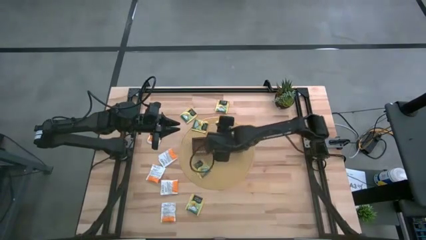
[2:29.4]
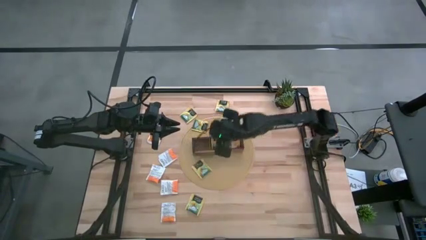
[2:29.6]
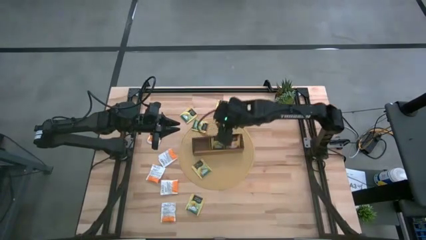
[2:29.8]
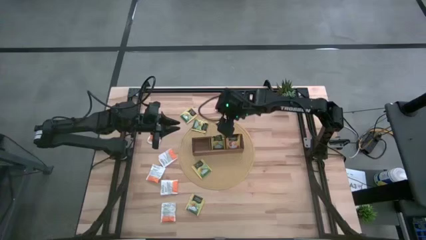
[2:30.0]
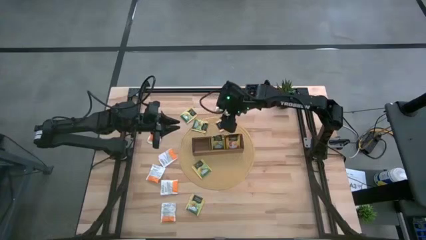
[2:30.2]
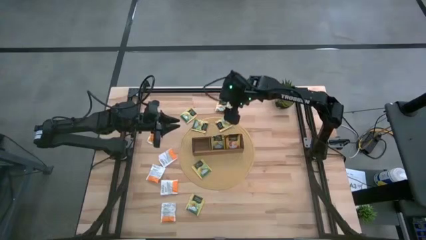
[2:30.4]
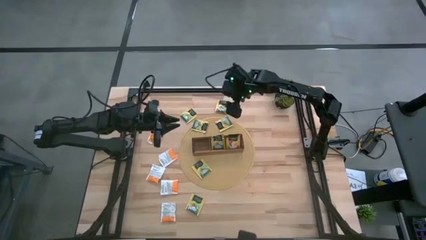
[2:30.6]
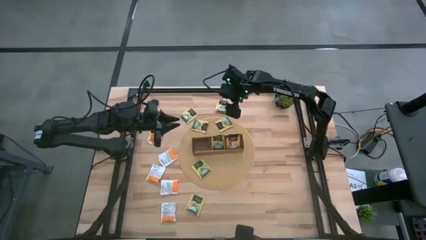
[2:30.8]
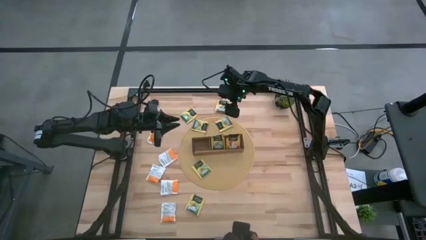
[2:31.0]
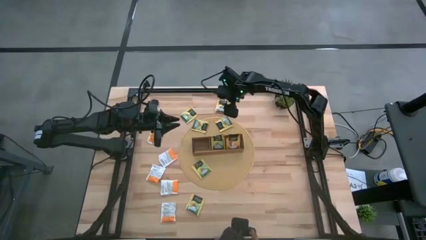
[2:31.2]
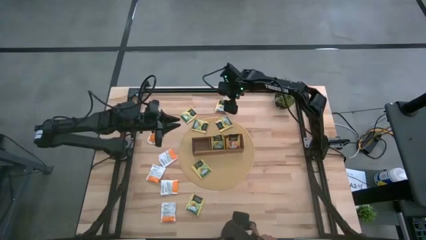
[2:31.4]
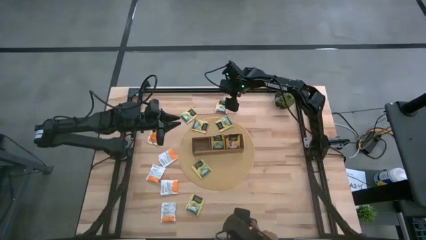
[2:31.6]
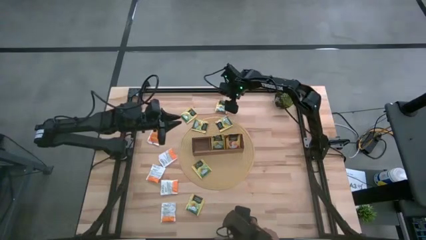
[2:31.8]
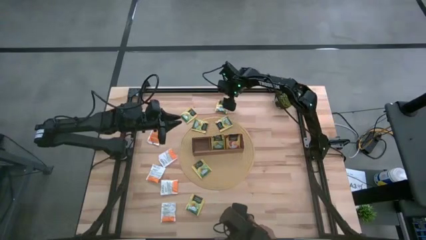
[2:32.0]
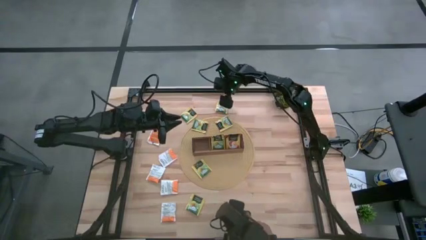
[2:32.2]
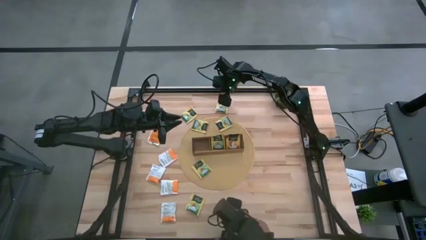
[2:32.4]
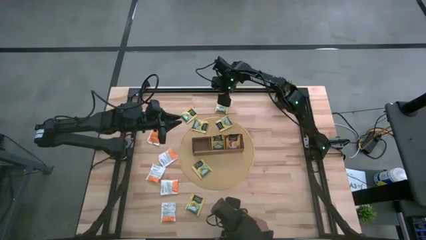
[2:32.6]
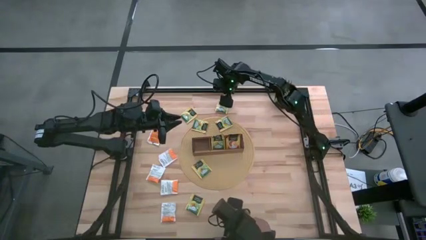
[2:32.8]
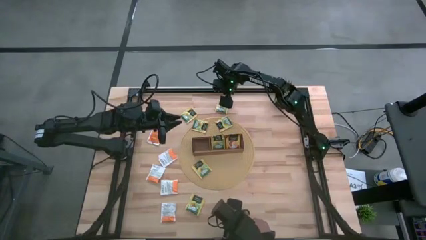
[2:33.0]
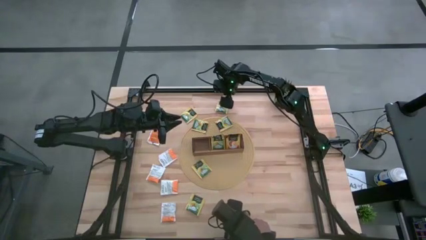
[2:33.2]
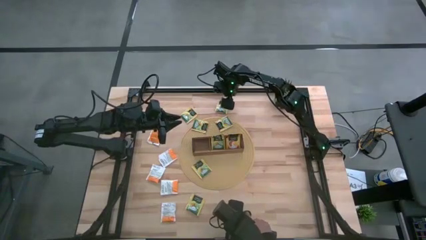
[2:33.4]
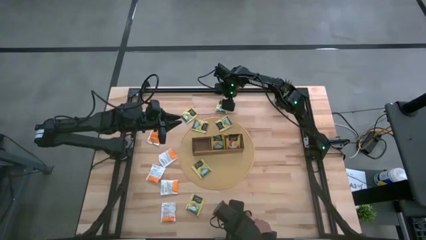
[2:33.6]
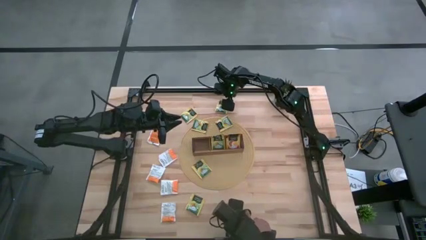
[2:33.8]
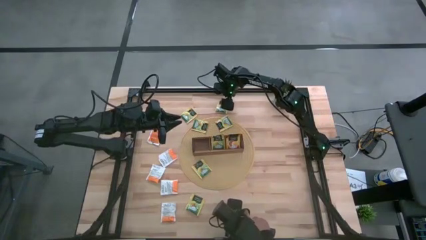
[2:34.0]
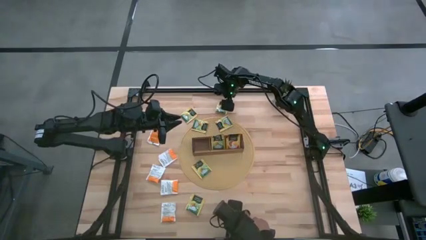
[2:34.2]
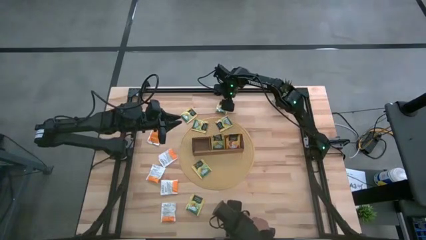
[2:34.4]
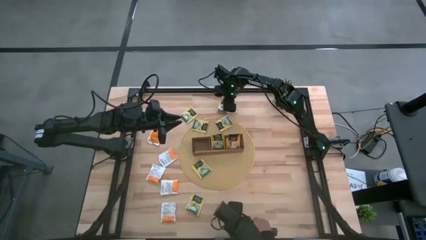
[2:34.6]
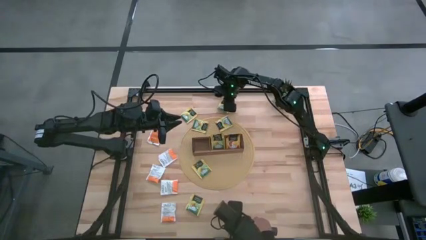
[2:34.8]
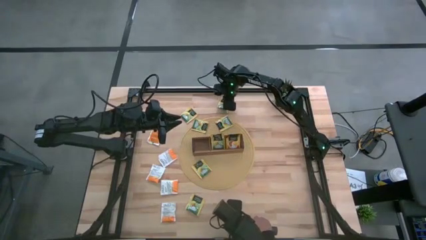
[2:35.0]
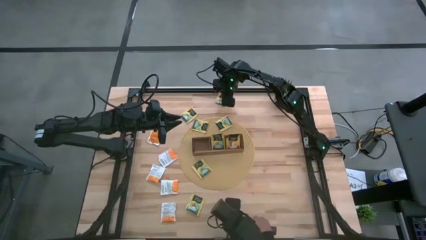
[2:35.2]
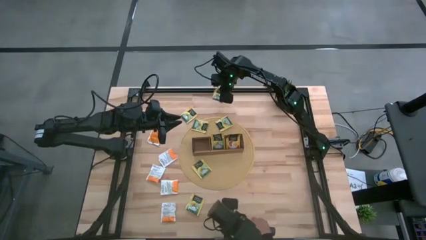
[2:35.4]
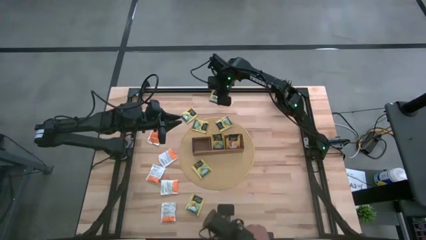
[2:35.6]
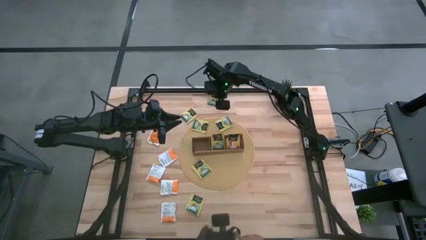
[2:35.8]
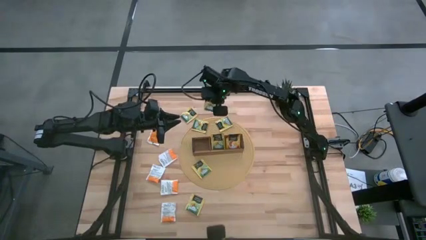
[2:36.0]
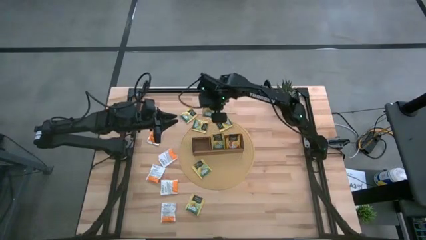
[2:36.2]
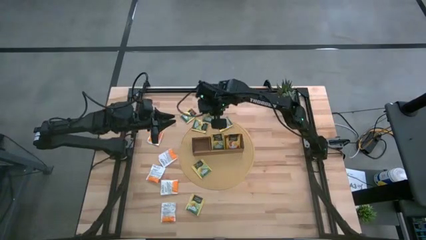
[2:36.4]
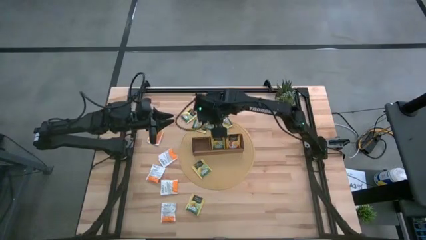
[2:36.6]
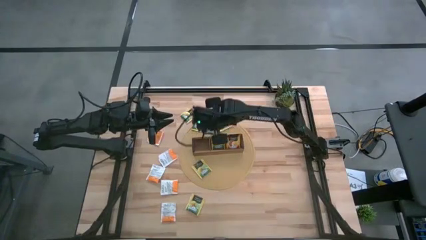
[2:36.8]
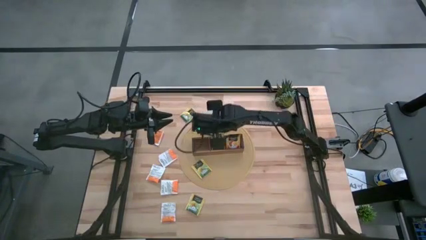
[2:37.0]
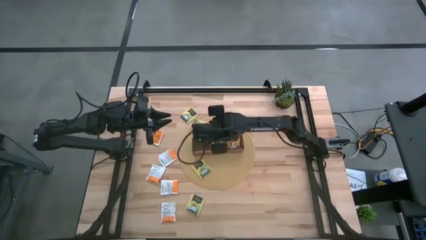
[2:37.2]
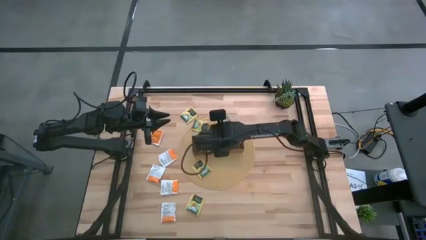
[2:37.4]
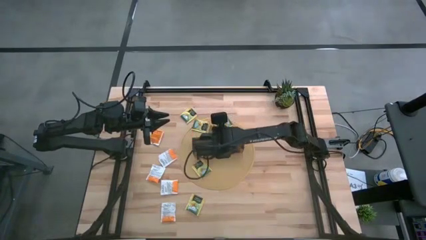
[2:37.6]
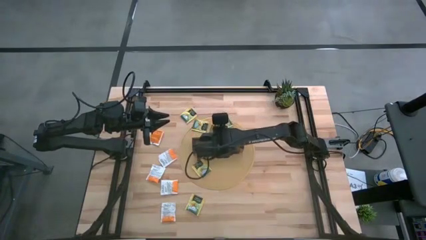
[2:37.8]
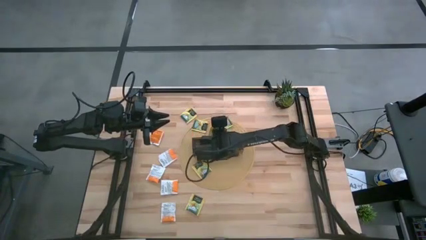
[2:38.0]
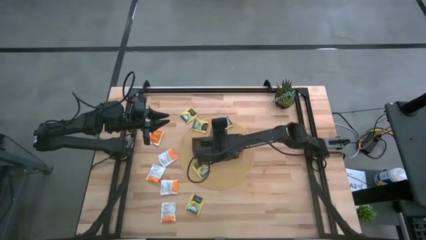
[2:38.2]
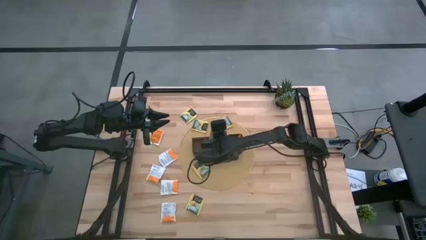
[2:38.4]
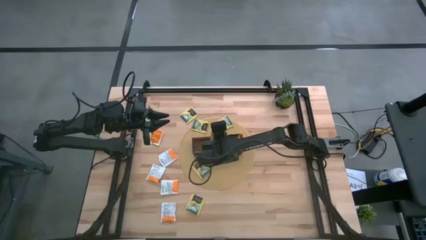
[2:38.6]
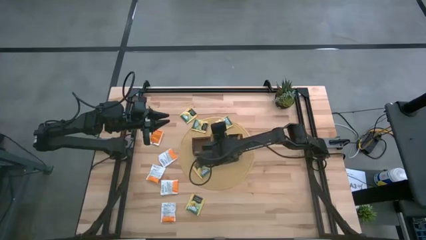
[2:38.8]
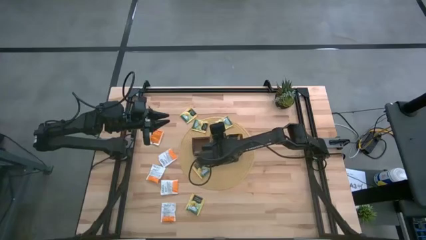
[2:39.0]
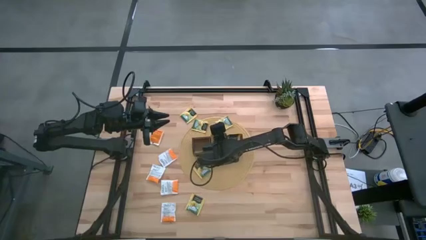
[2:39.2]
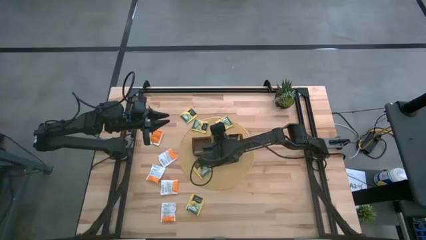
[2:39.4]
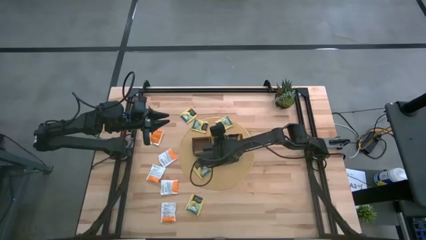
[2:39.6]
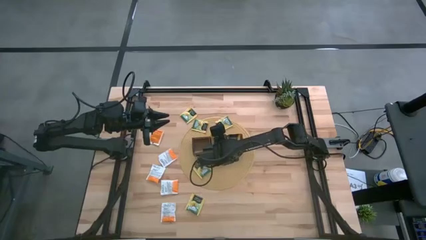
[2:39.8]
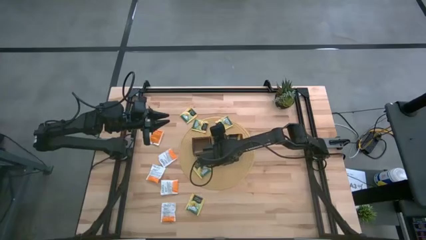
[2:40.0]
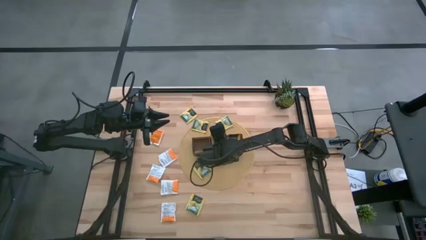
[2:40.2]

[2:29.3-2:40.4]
Task: Pick & Place Tea
Put the yellow tea bag into the middle section of the wooden organizer

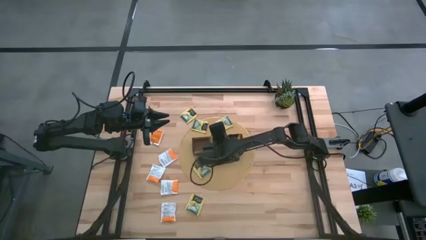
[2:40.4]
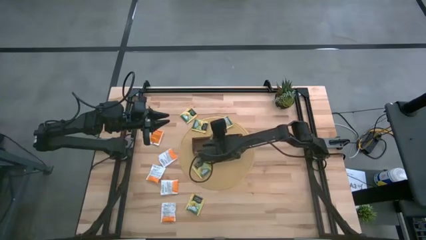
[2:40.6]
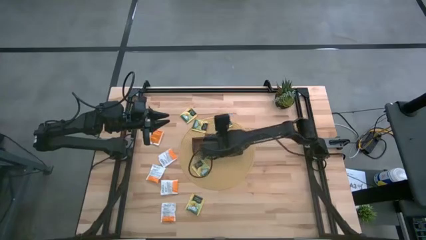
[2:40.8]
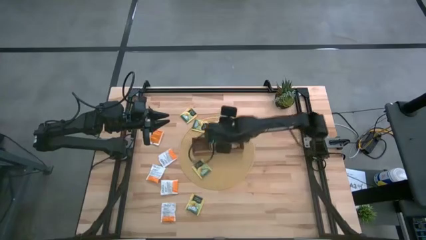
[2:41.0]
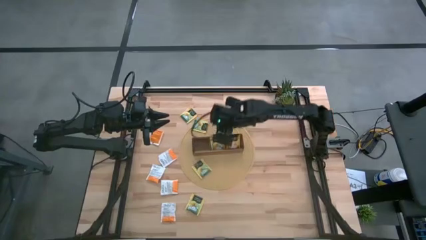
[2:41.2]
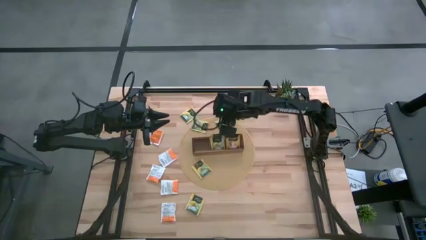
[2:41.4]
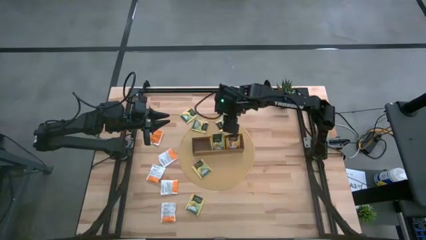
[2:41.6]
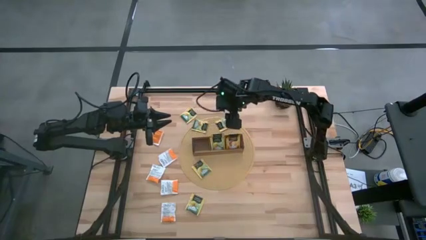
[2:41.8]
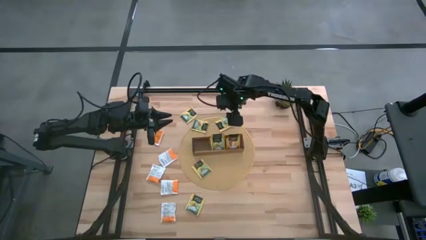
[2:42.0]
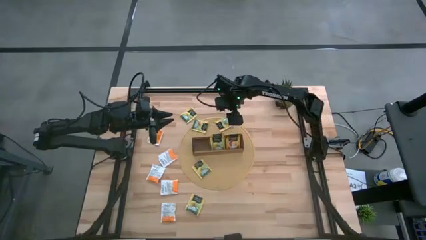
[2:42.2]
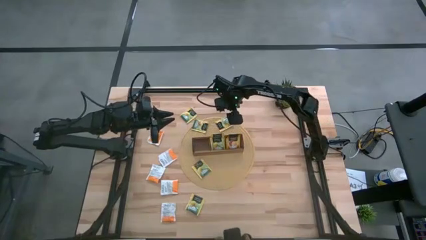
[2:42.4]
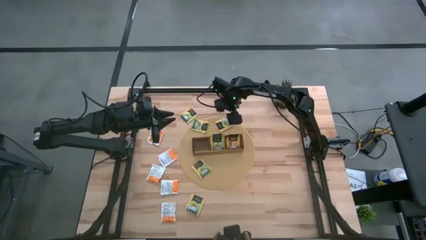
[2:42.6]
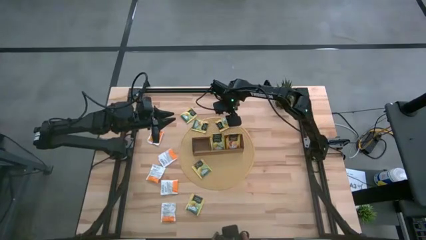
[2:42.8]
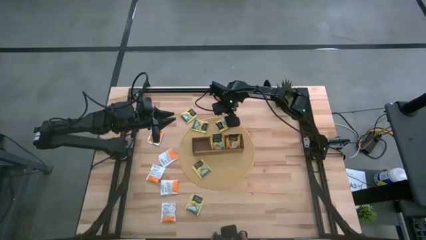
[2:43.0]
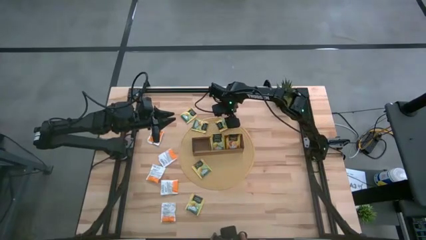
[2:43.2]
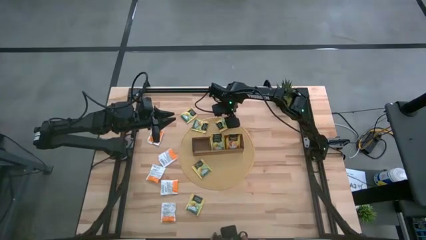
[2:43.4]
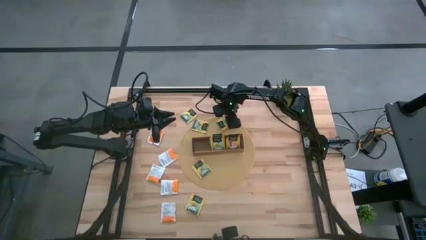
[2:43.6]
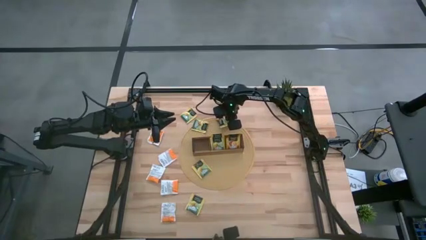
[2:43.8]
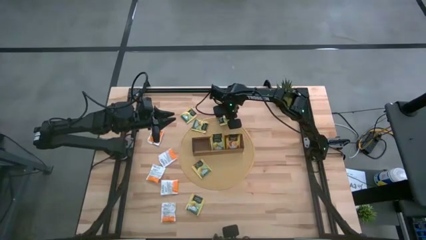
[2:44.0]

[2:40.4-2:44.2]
Put the yellow tea bag into the middle section of the wooden organizer

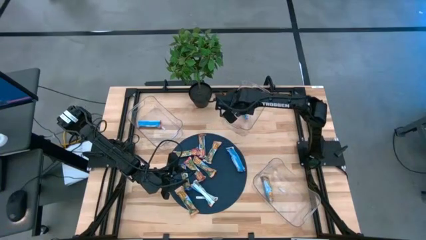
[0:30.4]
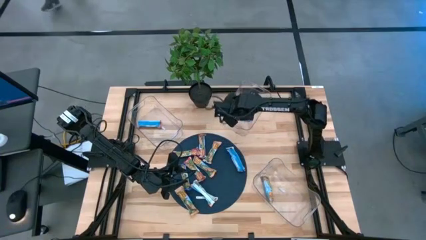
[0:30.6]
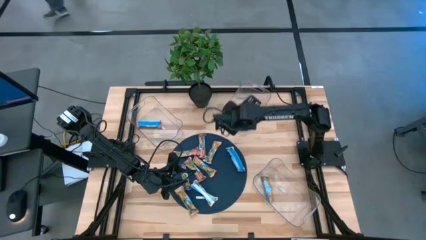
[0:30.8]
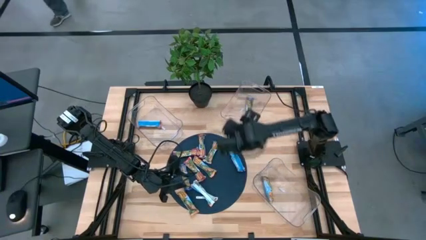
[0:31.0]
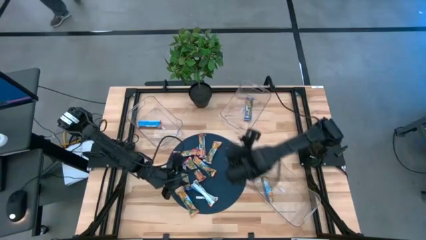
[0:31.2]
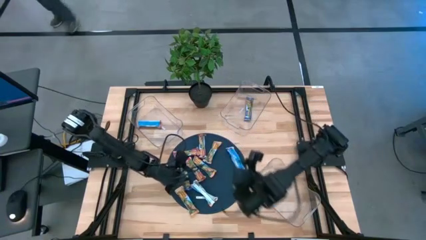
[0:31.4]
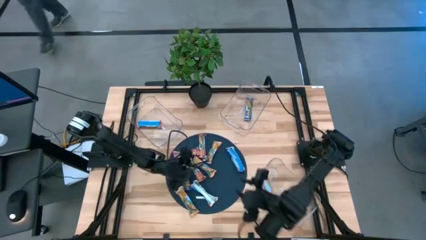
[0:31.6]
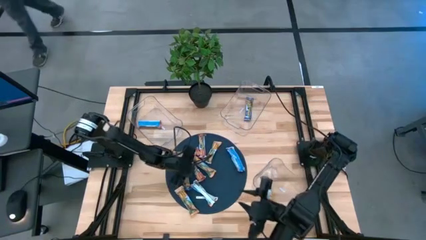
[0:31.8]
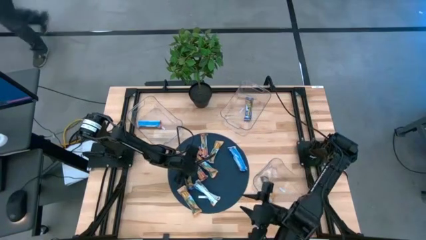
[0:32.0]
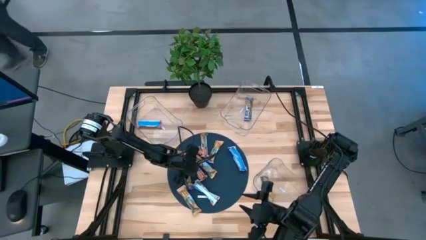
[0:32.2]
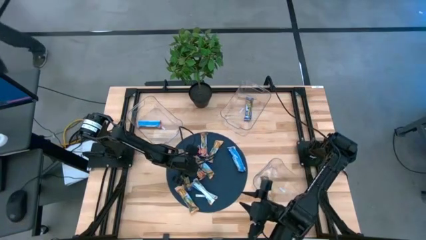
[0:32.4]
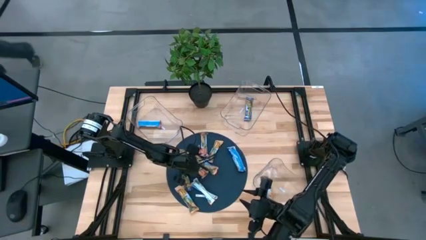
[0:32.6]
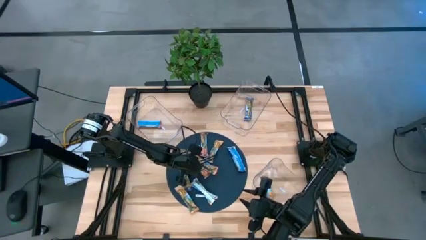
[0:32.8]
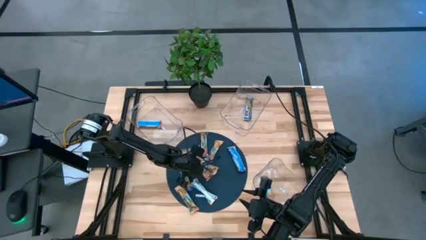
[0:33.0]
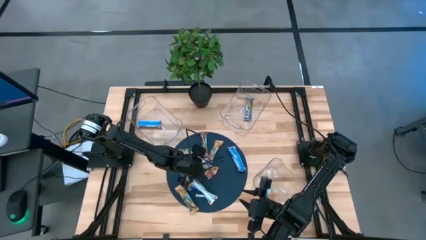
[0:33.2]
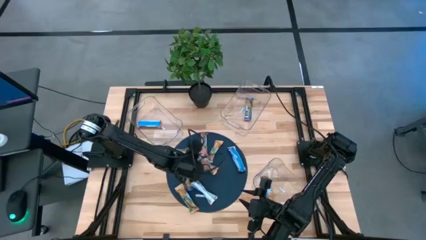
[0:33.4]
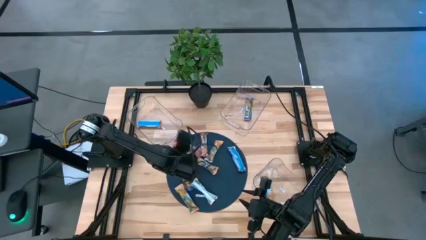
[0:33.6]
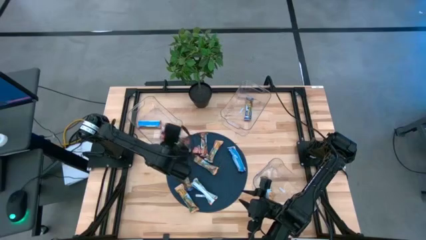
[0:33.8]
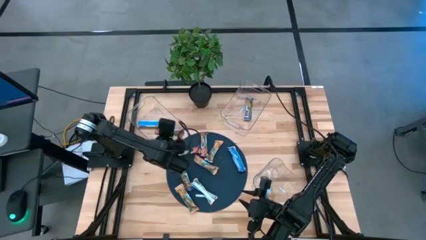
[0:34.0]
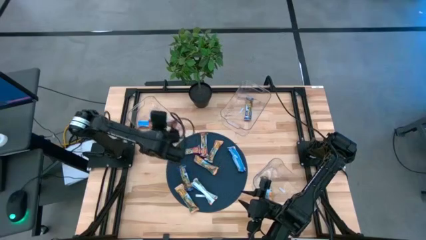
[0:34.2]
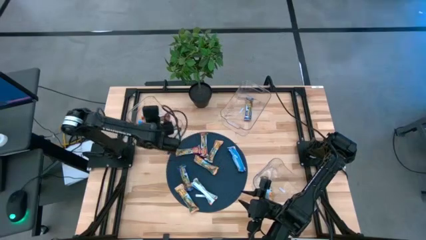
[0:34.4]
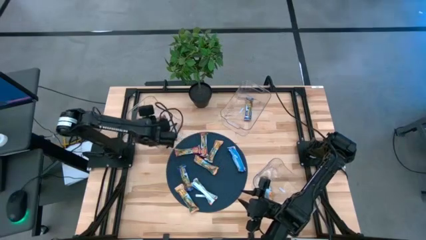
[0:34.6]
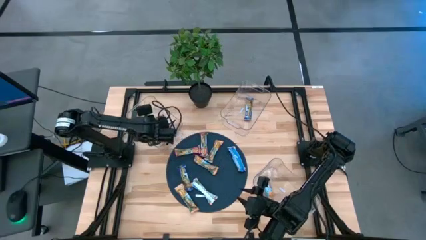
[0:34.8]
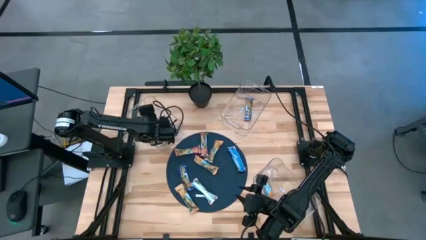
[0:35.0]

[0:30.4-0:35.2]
Task: Pick and place Granola Bars by type
Put the red granola bar into the top left transparent bin
